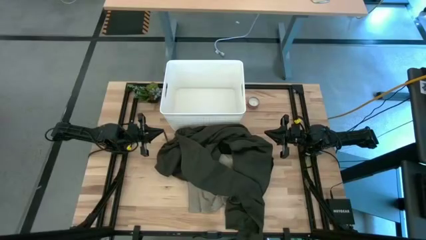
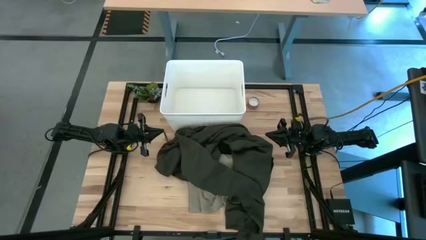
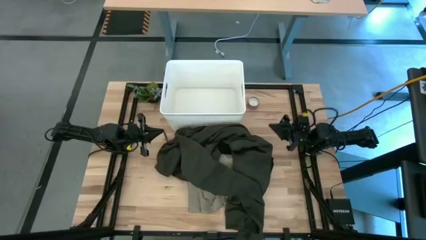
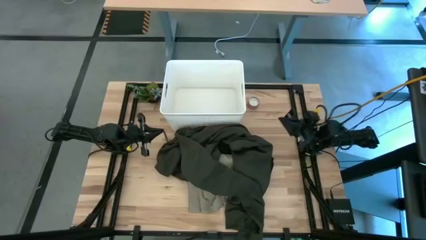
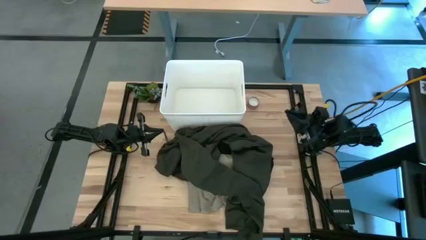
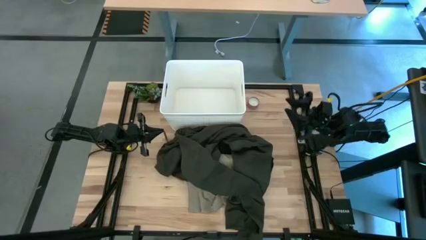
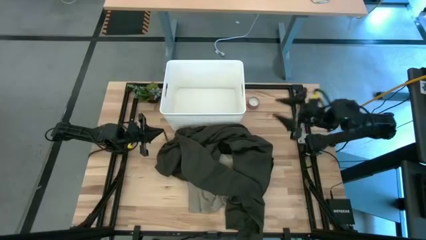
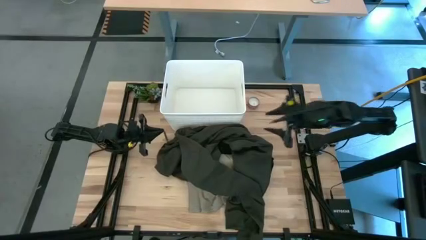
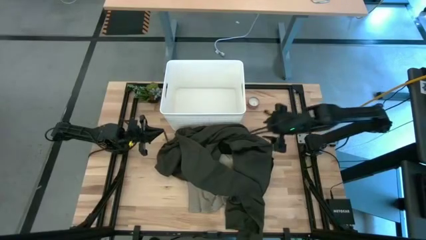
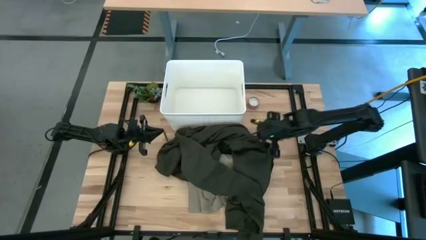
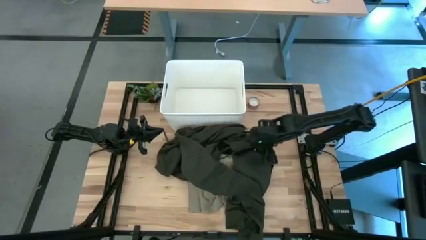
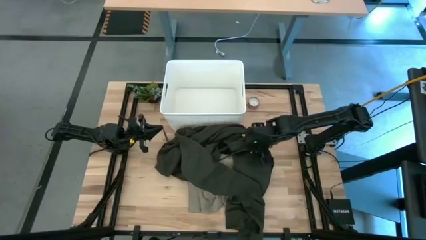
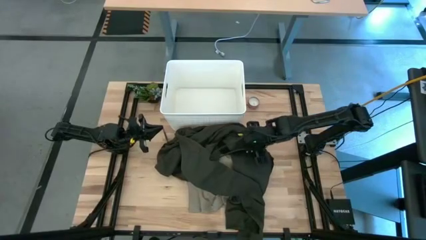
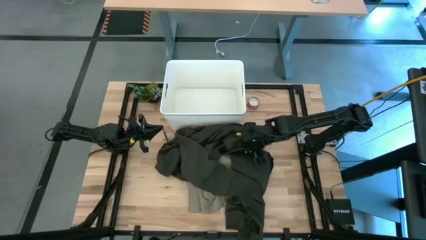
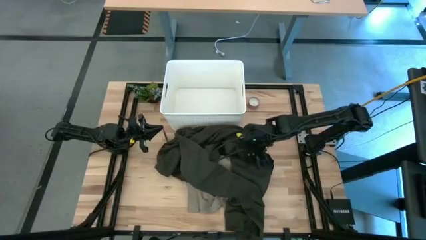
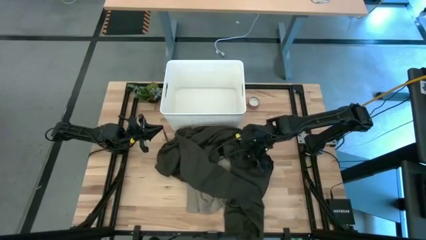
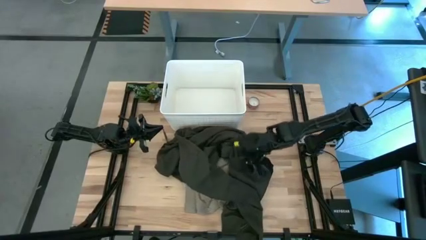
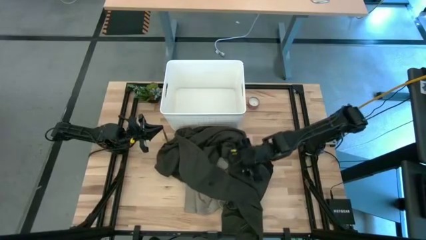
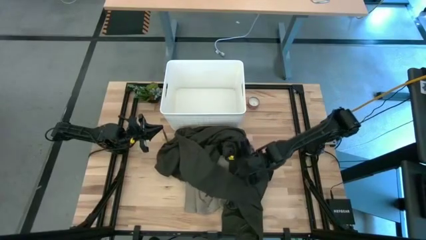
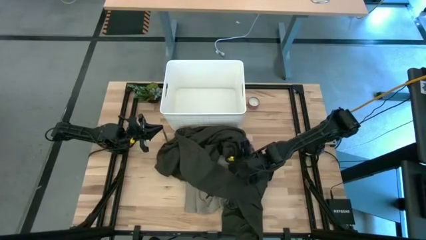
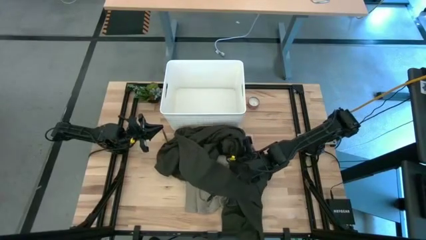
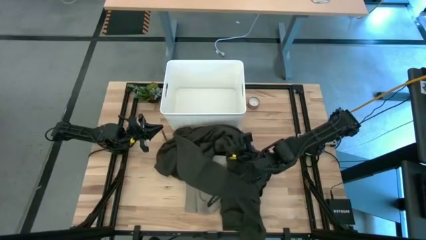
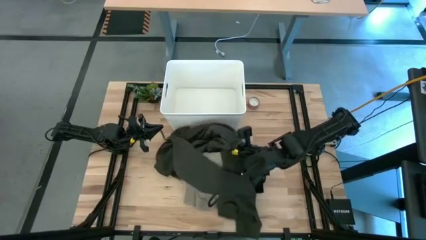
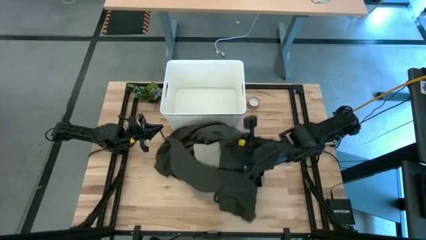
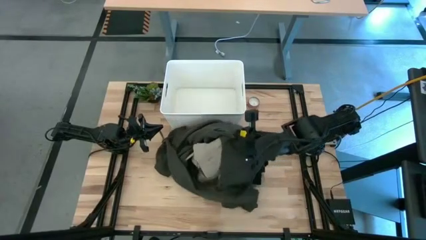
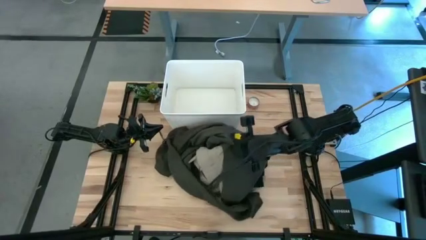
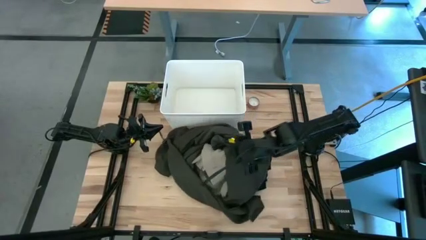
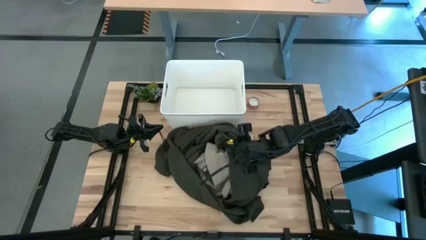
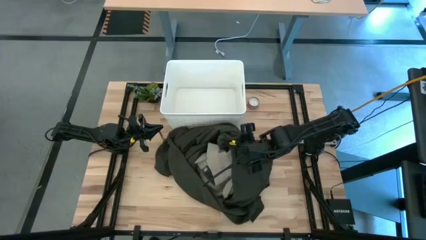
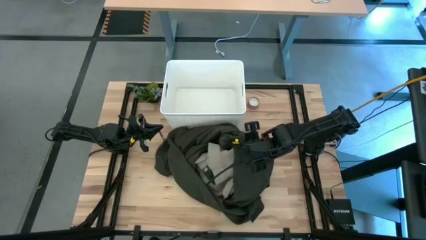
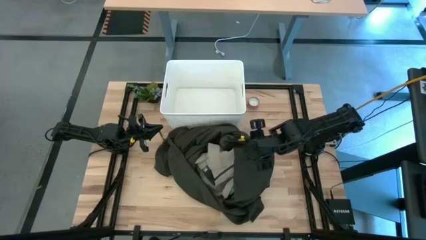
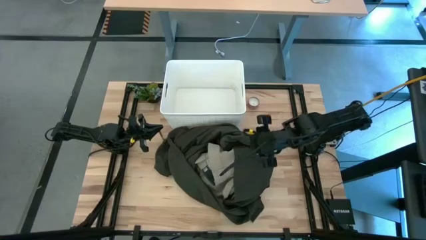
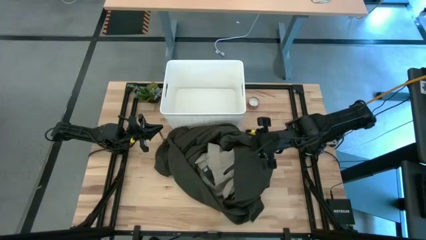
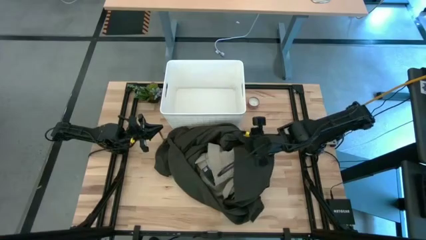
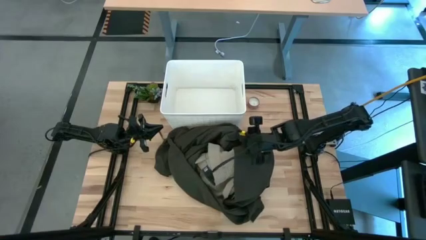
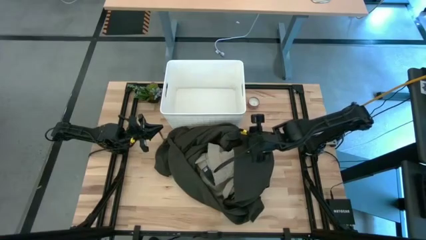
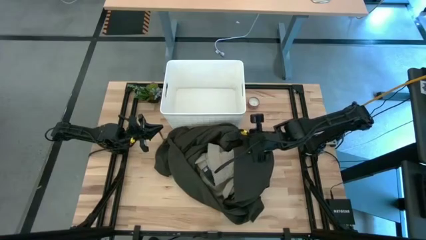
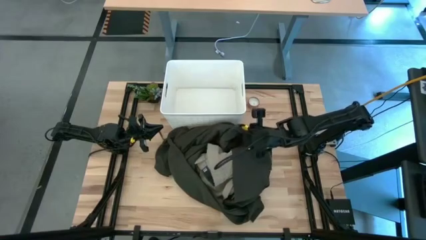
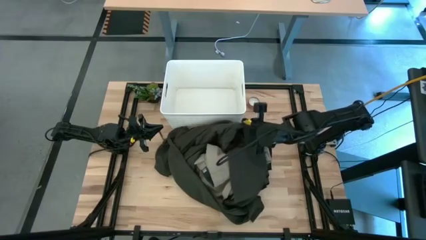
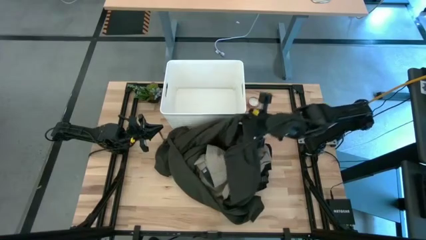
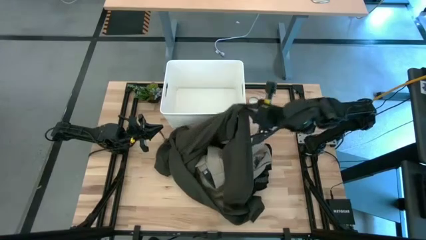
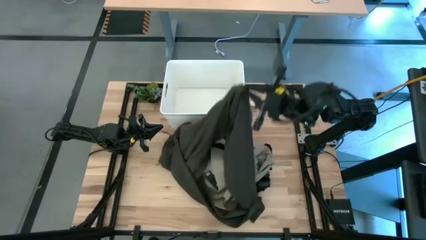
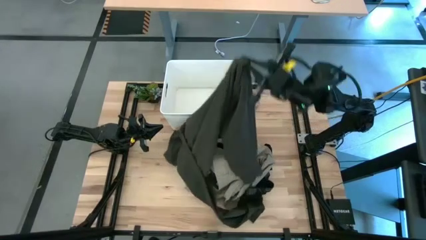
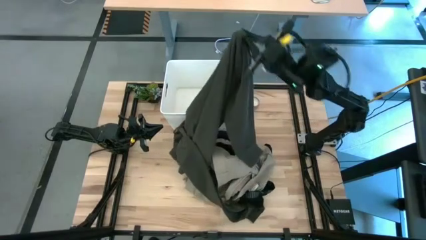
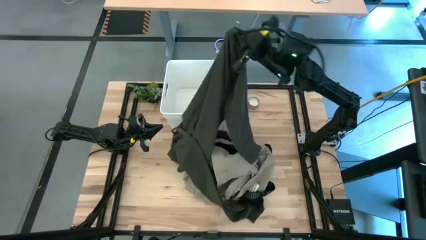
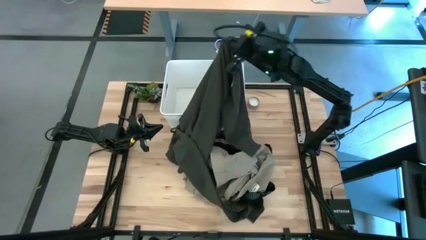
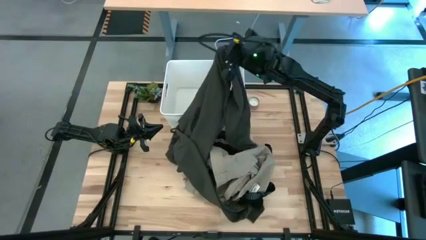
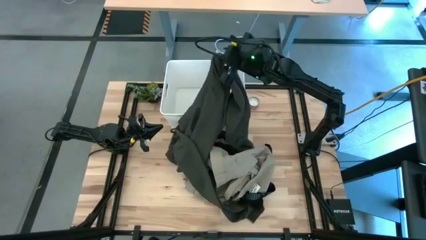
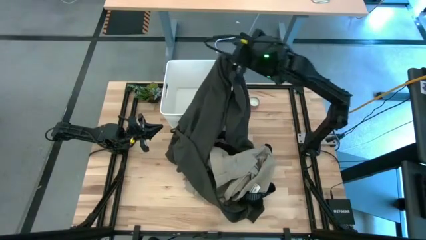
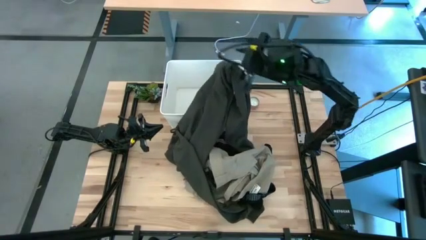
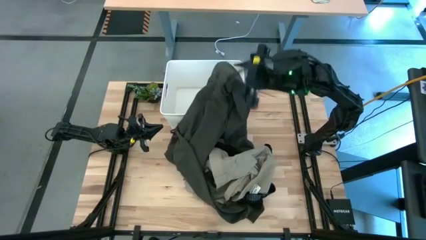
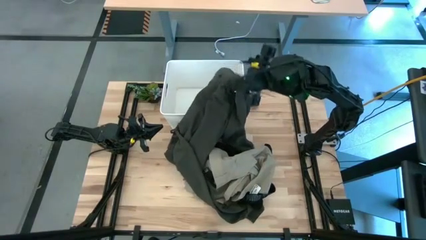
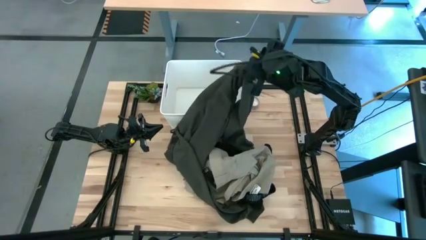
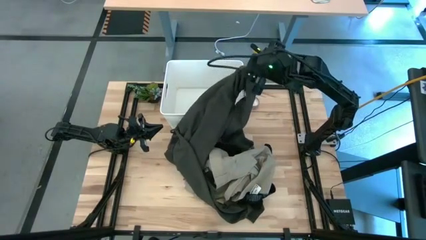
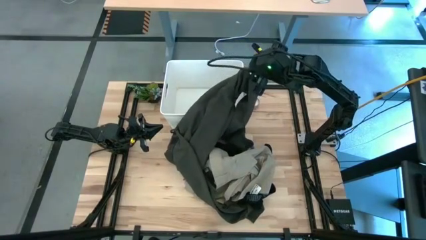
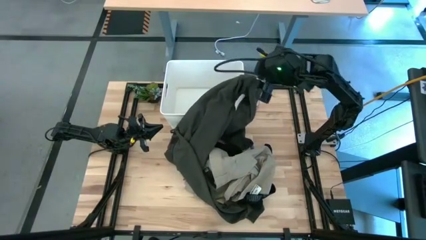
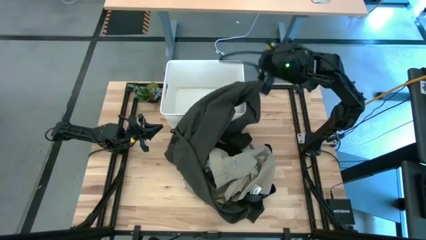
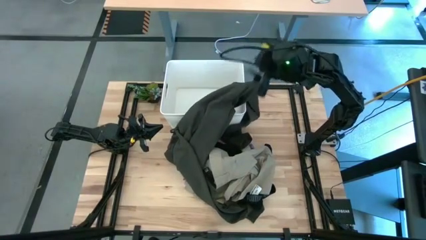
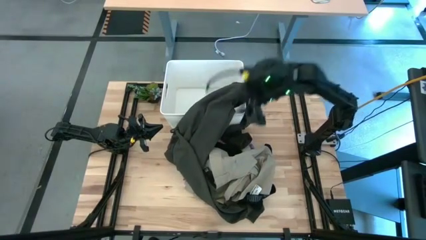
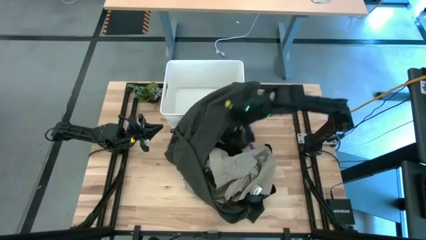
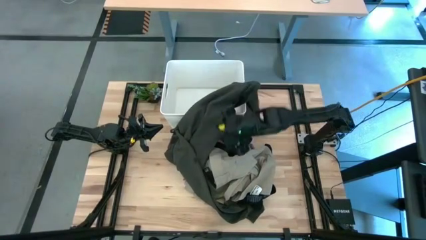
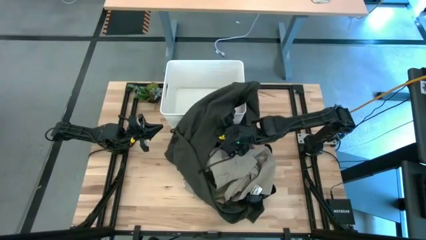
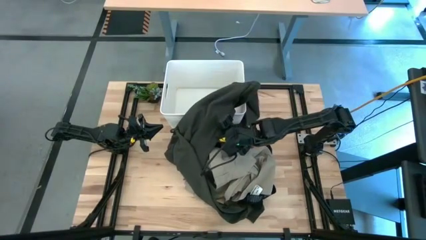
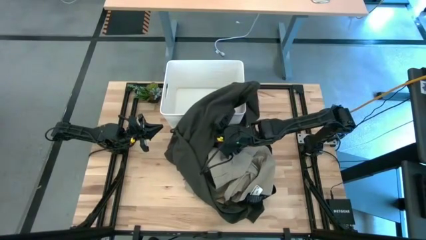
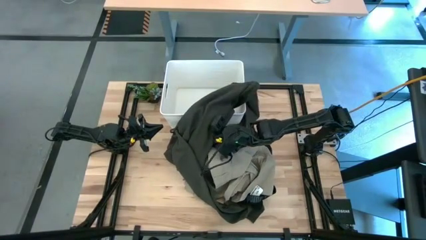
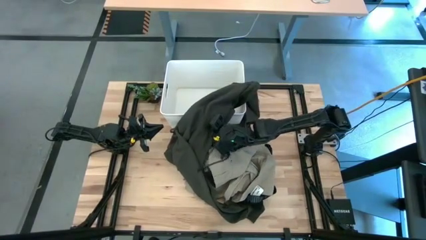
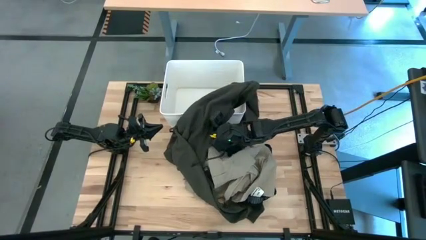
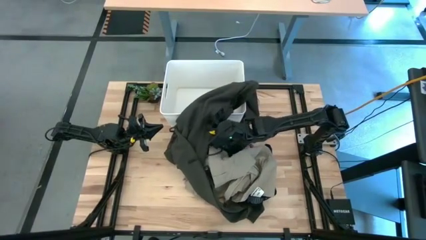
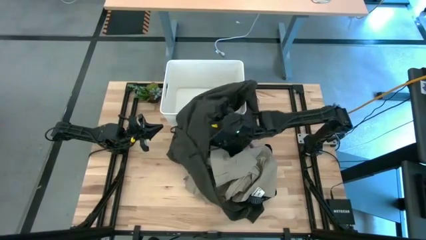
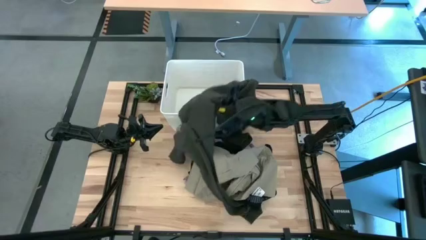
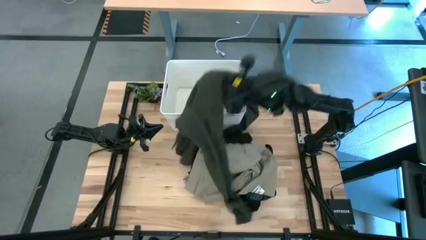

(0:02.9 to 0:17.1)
Task: Sort clothes
Put the green jacket into the white bin
